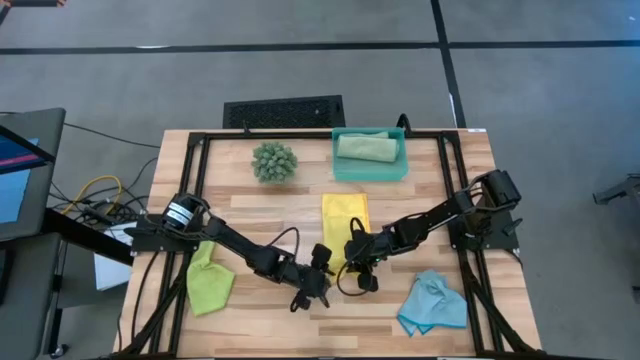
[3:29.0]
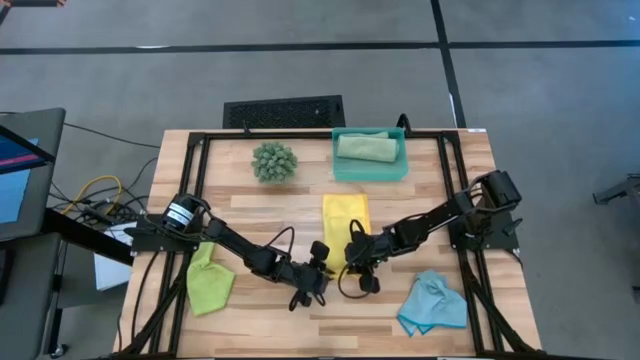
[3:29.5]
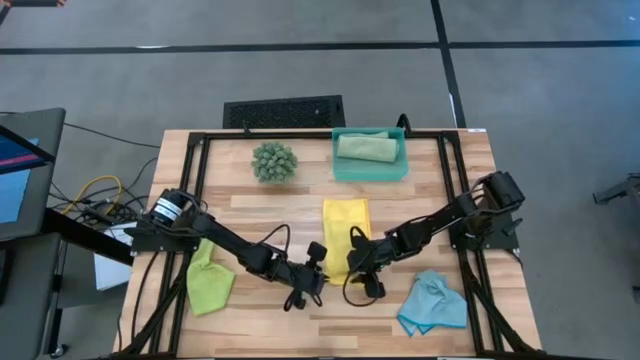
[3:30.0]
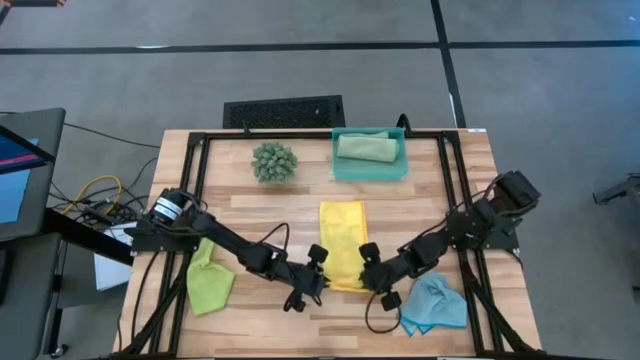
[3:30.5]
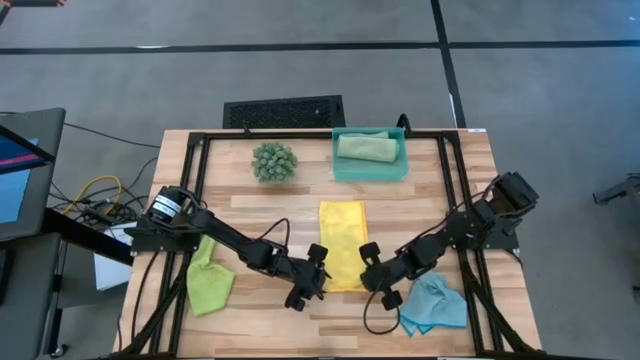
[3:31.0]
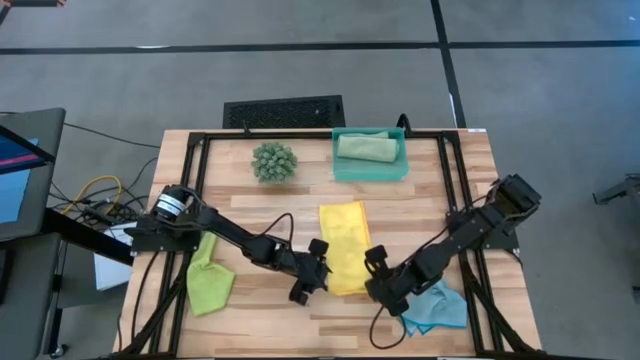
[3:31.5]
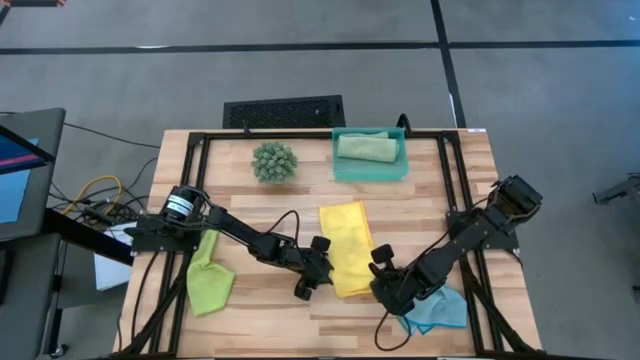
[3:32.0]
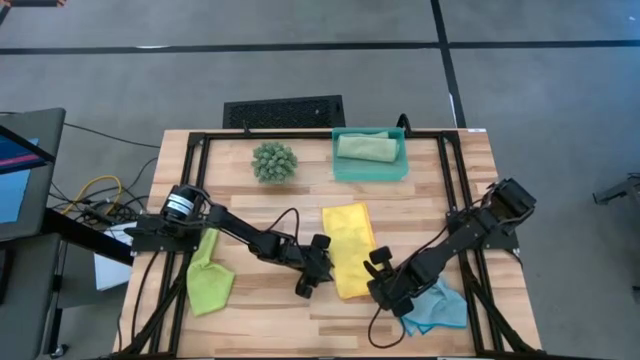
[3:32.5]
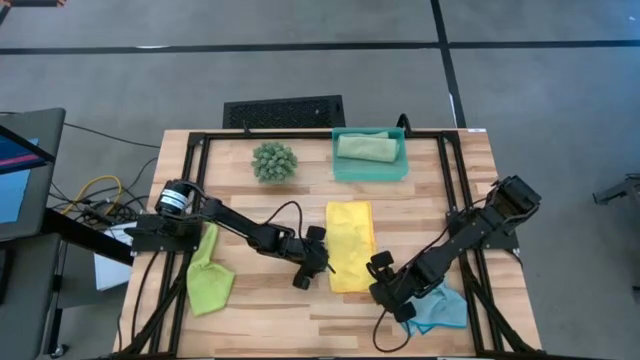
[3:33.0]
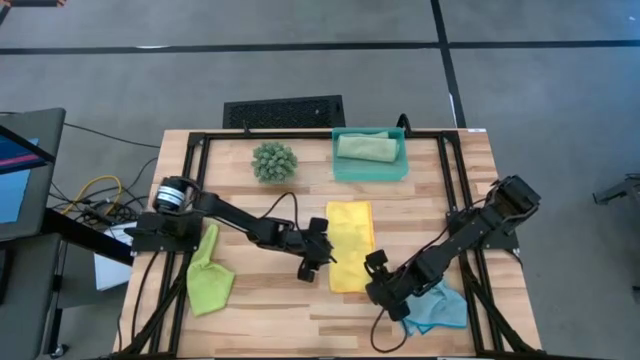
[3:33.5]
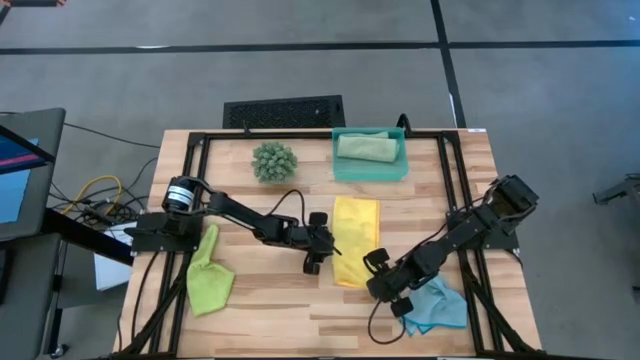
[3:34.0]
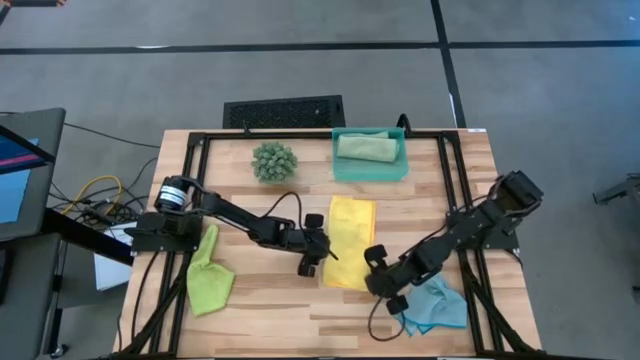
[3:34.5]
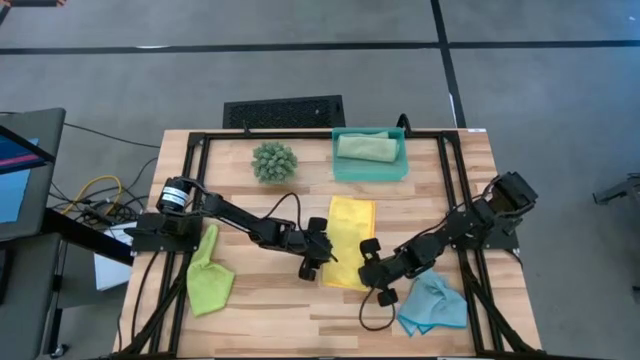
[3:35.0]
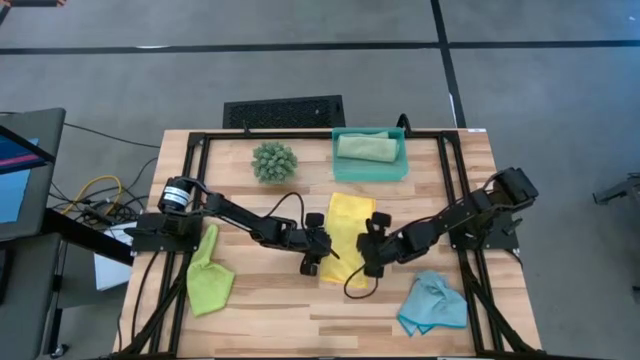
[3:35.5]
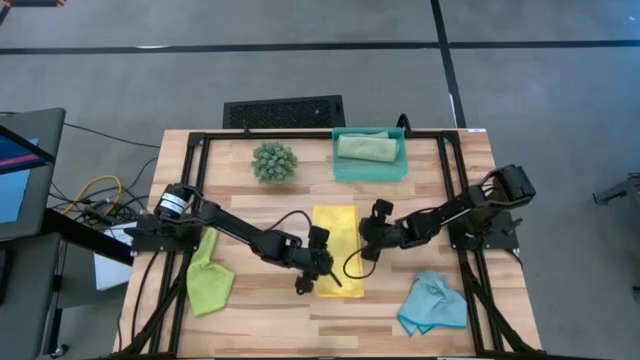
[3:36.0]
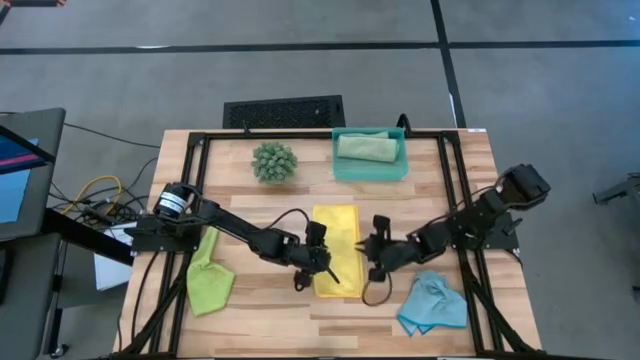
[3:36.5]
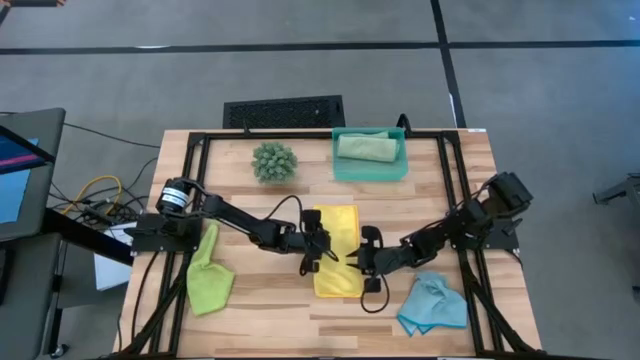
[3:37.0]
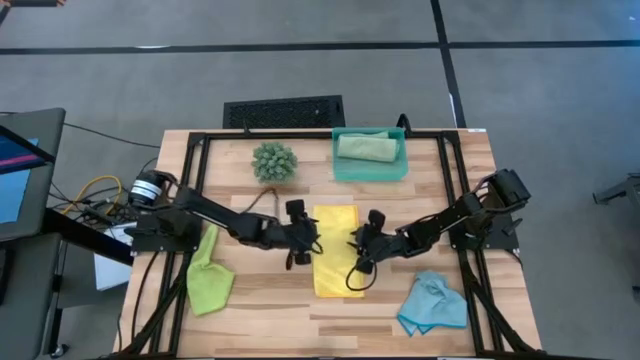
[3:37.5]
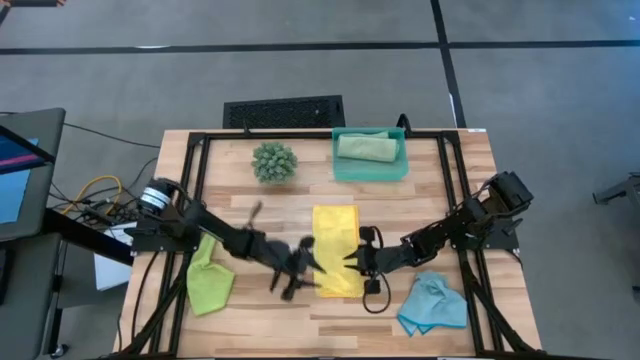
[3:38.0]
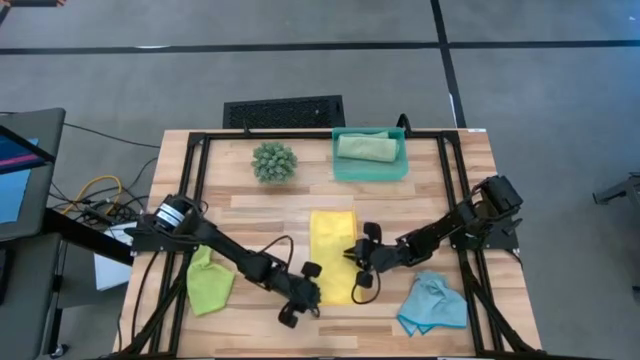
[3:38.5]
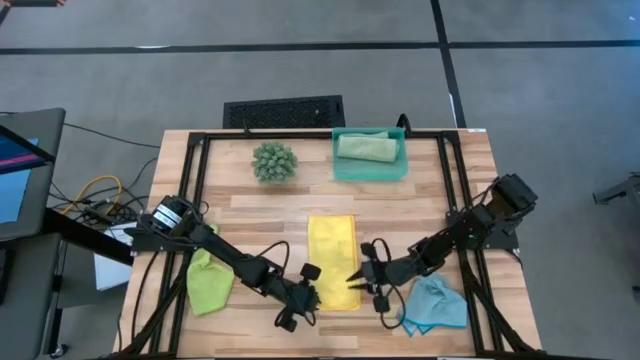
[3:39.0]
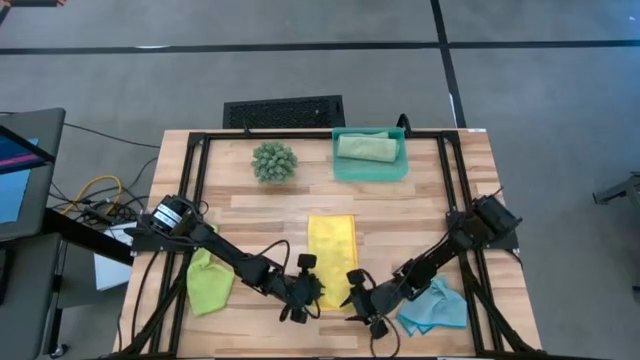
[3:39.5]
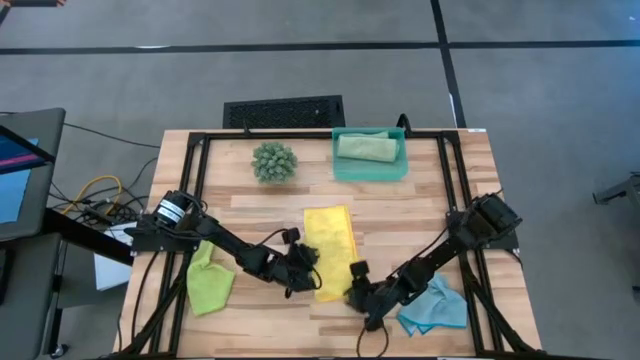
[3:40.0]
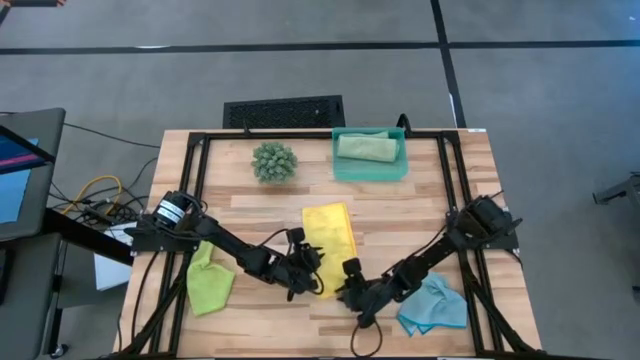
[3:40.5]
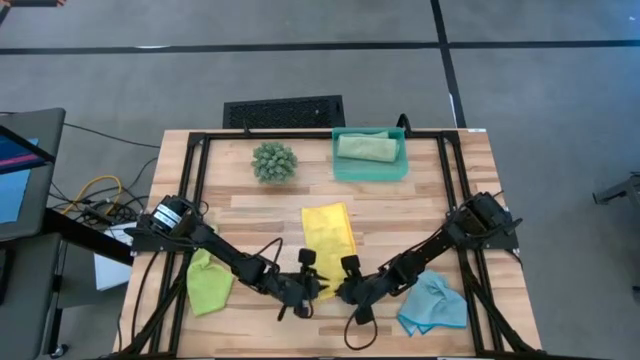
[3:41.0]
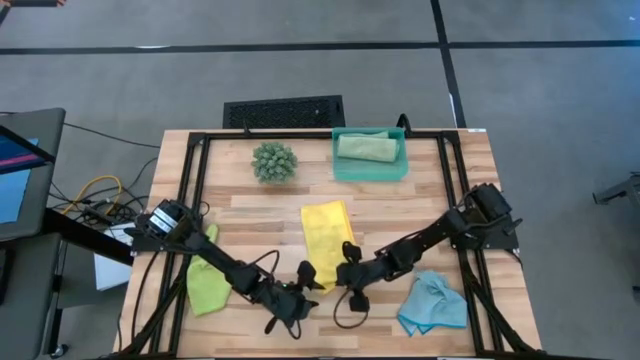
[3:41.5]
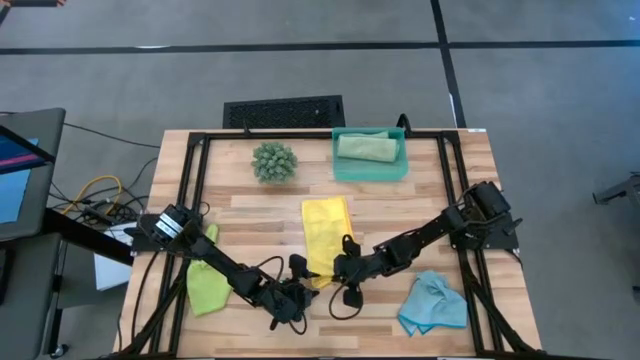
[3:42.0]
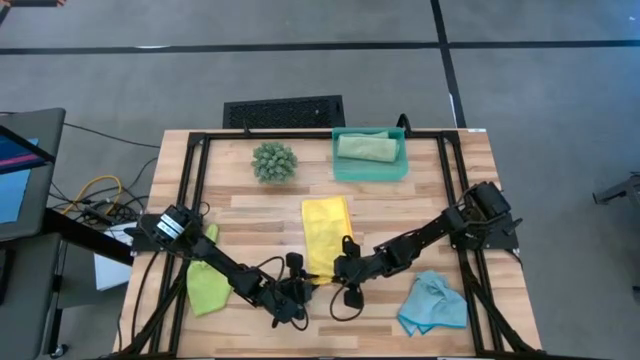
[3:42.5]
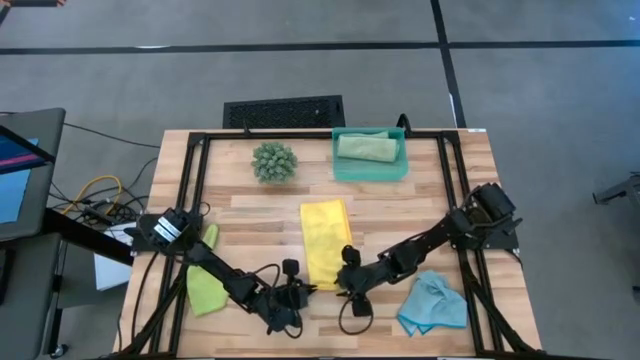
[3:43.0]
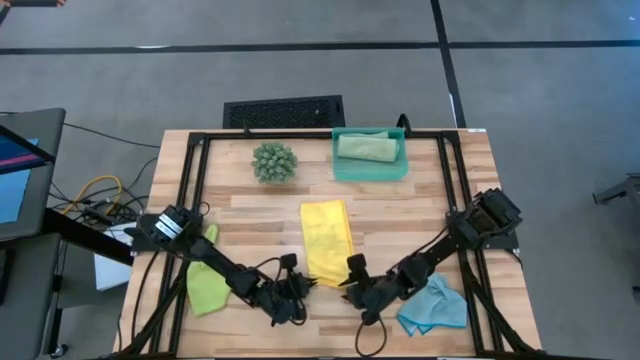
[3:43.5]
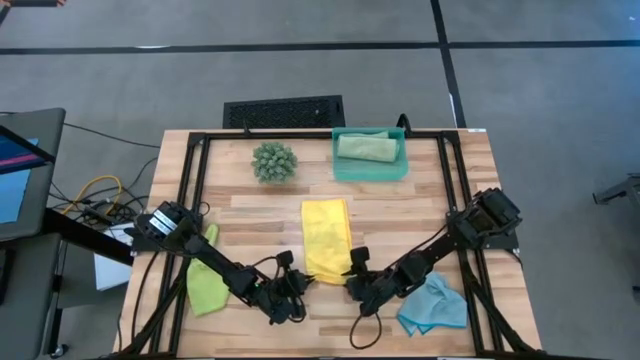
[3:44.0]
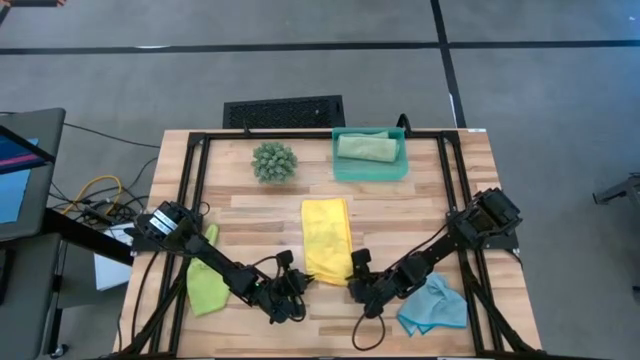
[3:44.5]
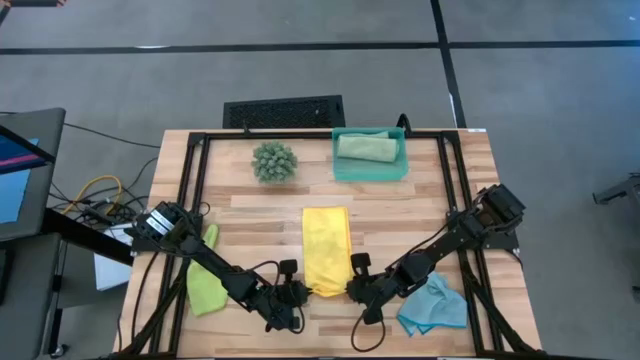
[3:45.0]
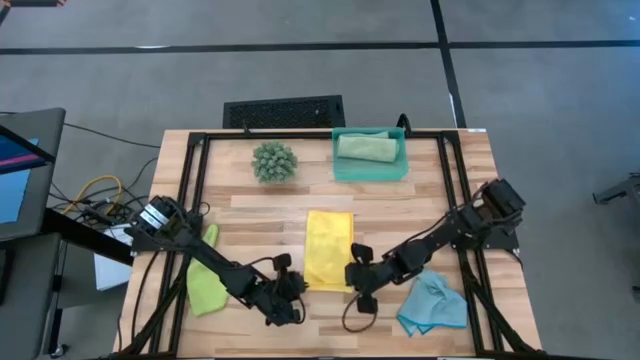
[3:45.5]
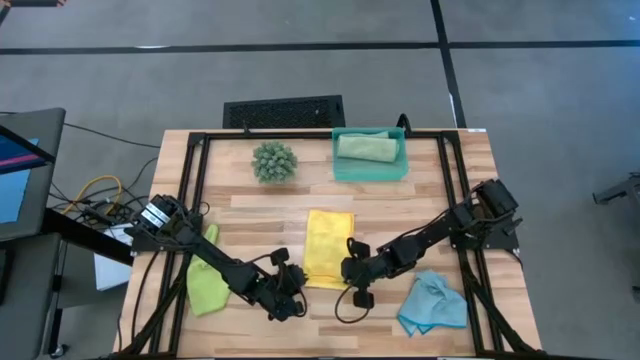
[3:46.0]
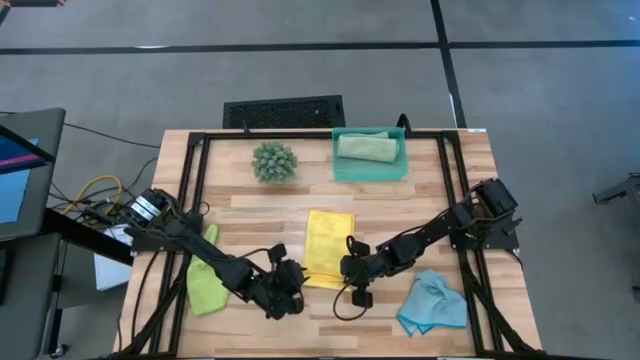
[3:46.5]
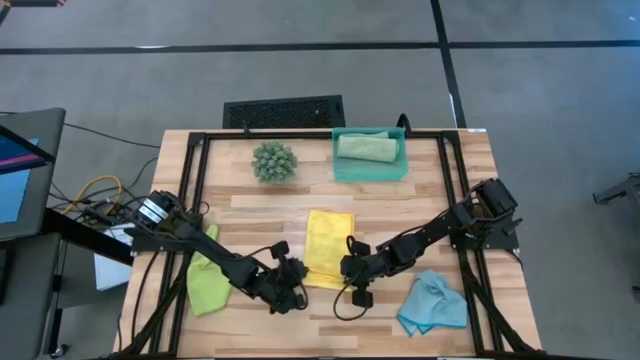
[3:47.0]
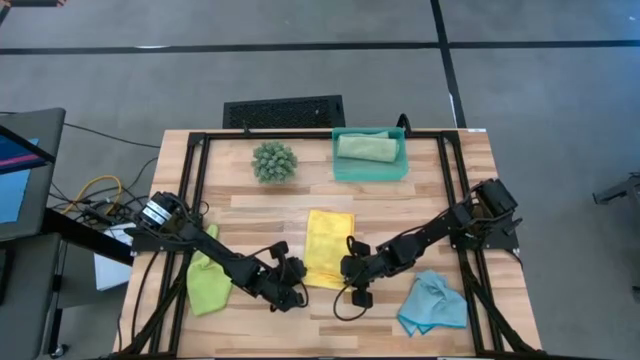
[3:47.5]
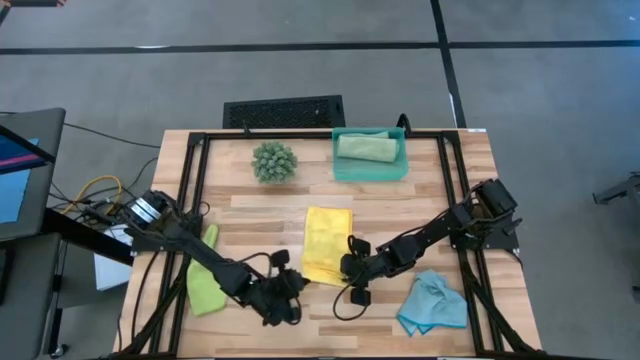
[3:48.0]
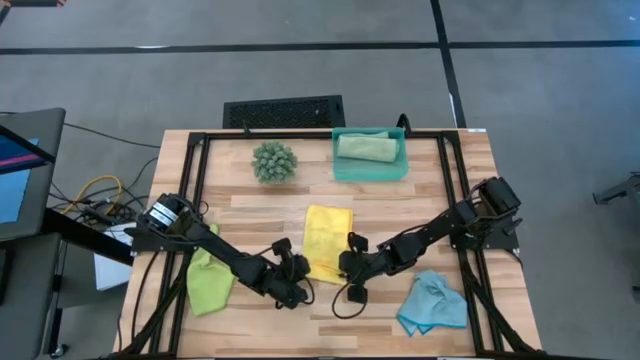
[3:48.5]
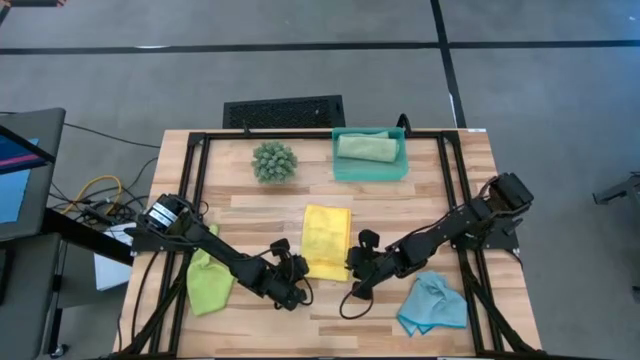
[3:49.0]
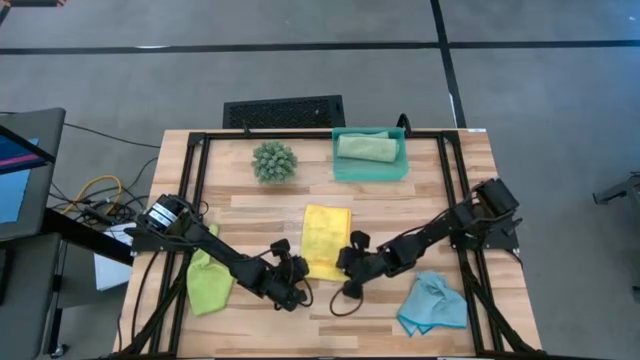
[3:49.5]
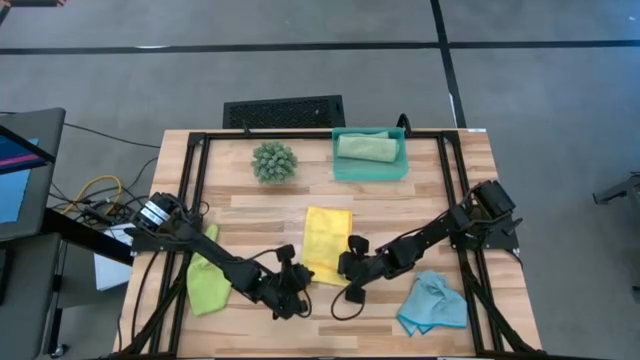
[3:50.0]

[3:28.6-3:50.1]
Task: Roll microfiber towels into tight, uniform cylinder then place into a basket
Roll the yellow microfiber cloth
